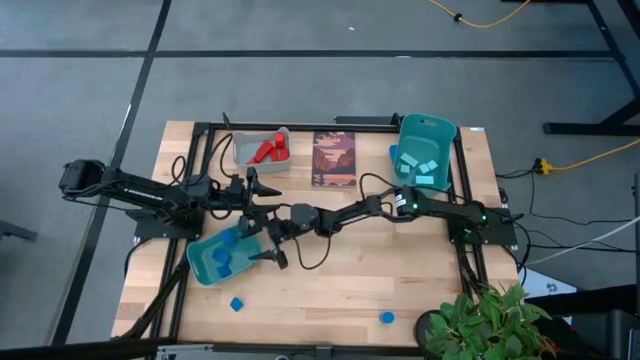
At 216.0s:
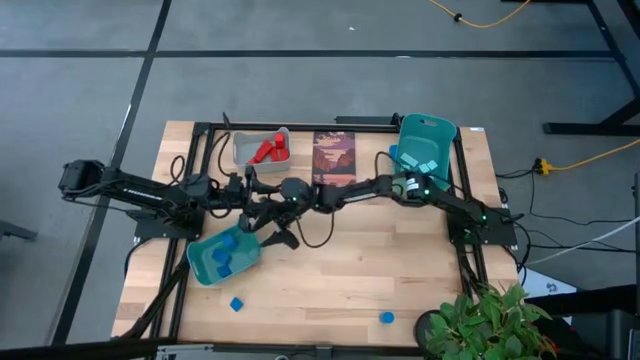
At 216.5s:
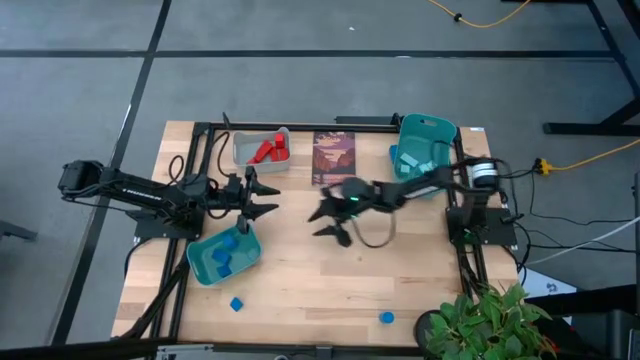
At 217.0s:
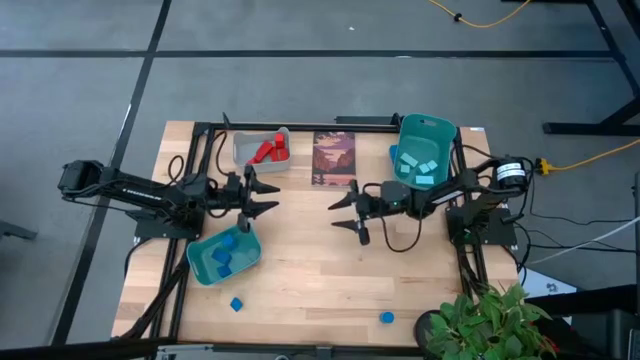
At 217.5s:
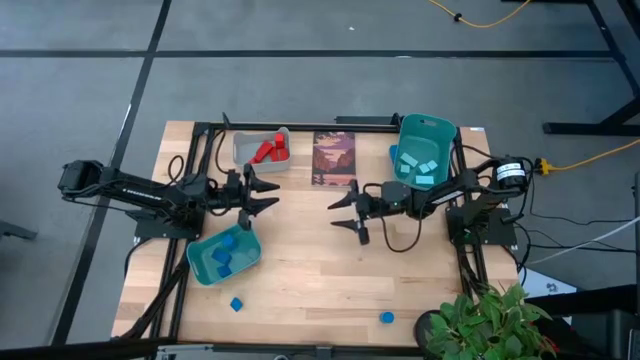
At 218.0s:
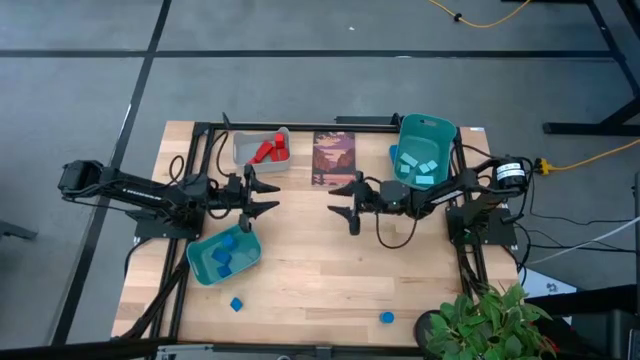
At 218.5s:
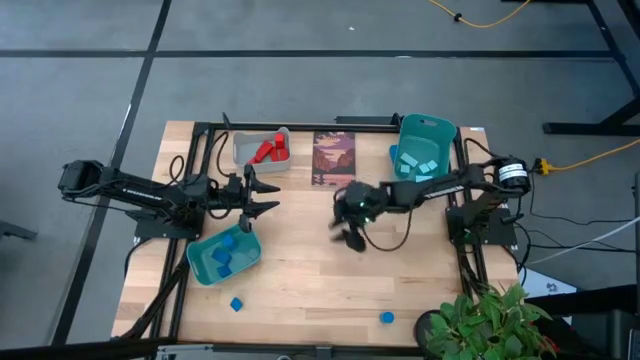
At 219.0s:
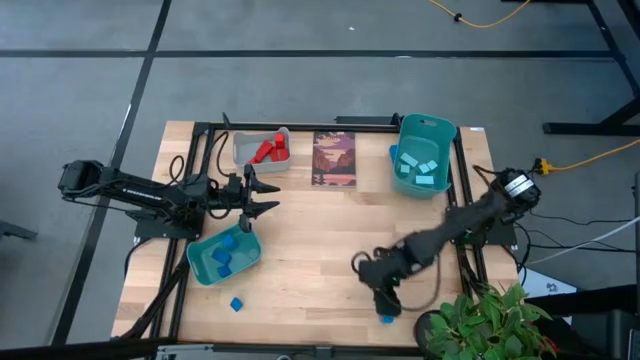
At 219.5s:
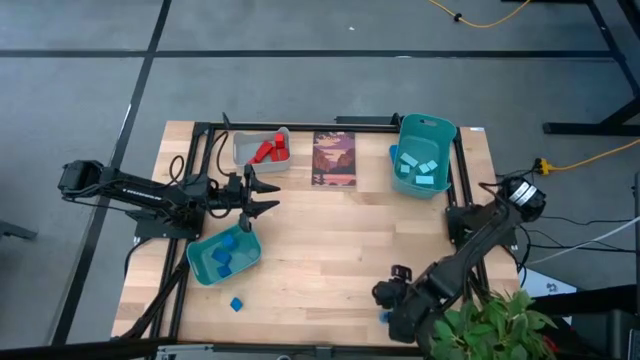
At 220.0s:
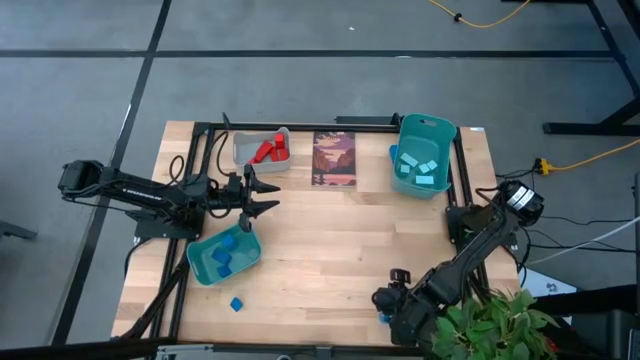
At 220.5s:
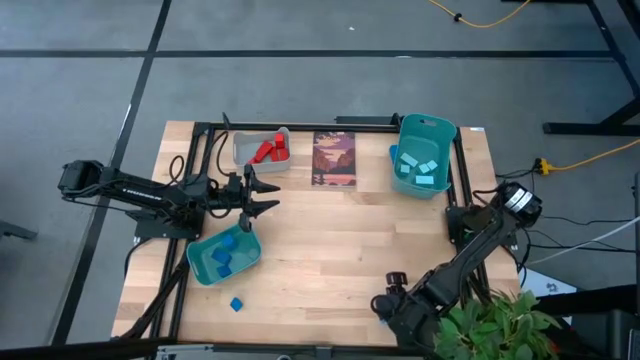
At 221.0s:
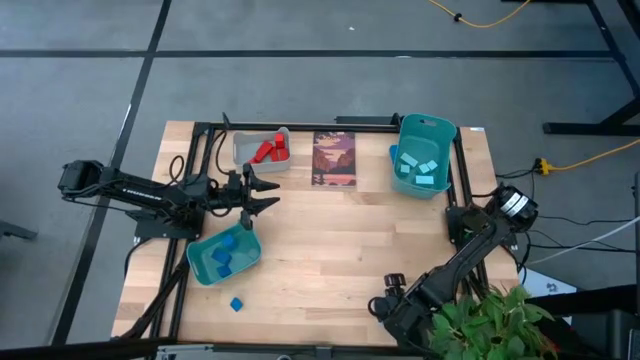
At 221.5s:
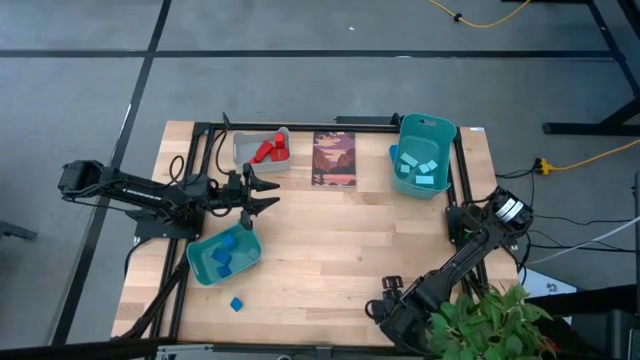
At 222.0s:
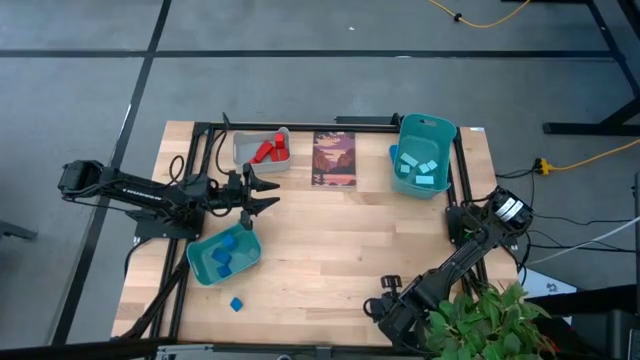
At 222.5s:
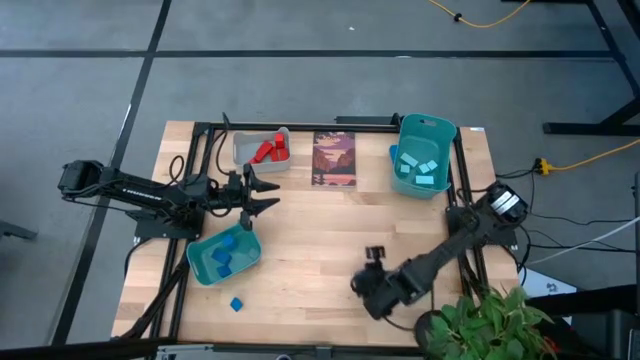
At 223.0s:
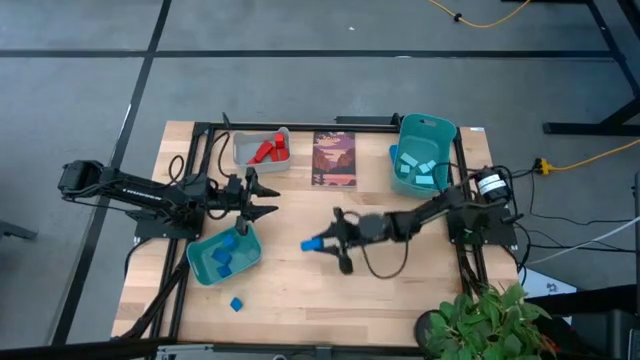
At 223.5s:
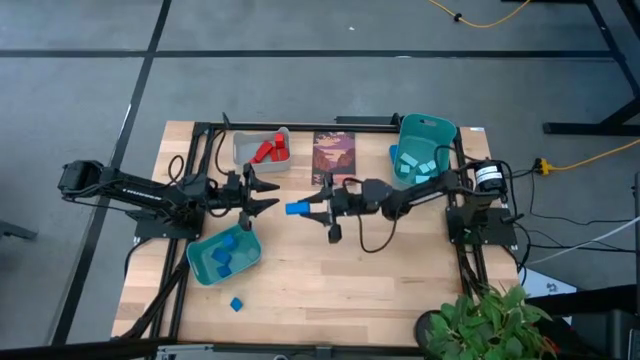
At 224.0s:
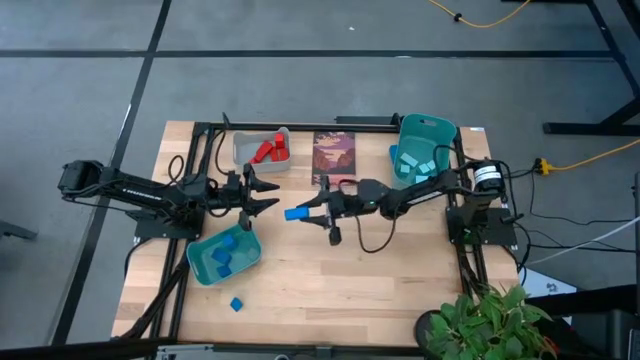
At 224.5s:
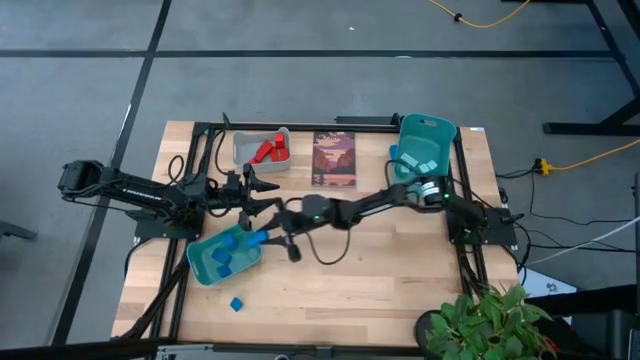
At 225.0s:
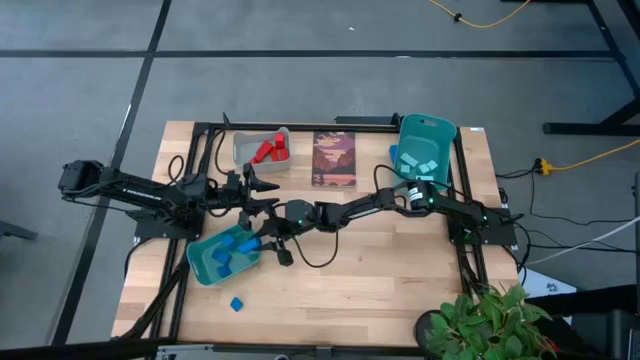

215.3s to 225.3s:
Task: Sort & place blocks by color
Put the blue block into the left green bin

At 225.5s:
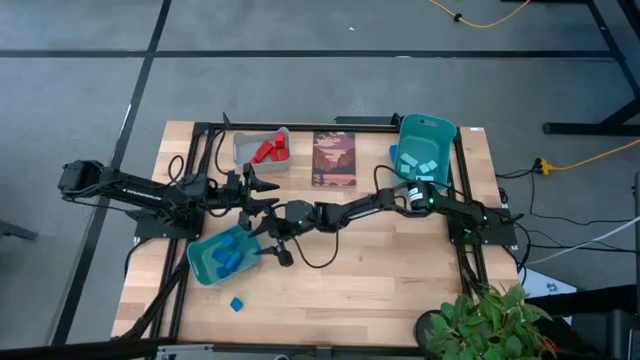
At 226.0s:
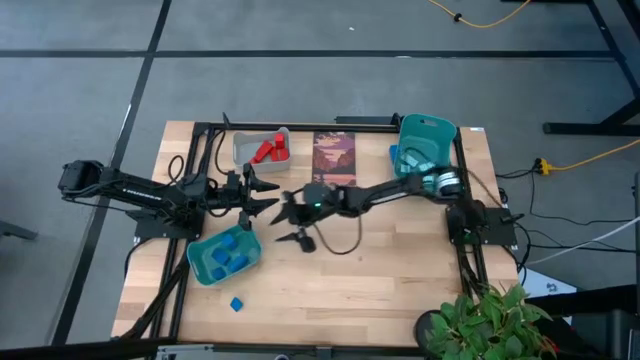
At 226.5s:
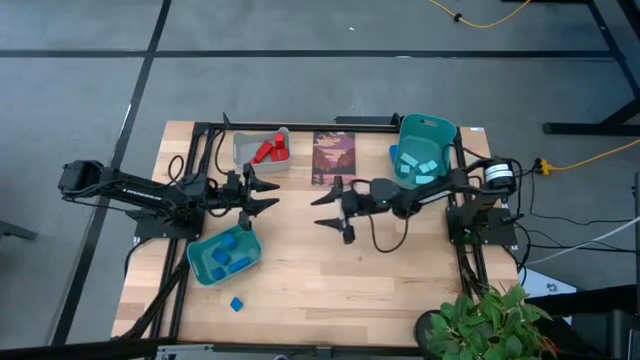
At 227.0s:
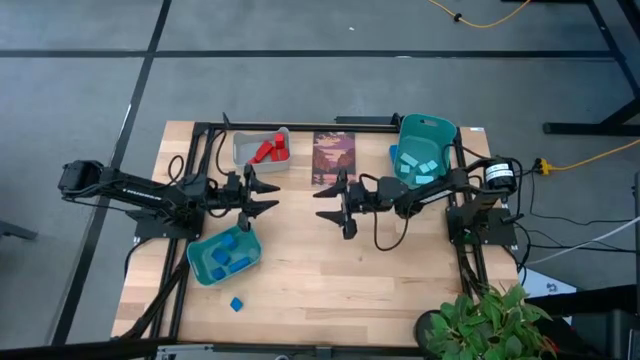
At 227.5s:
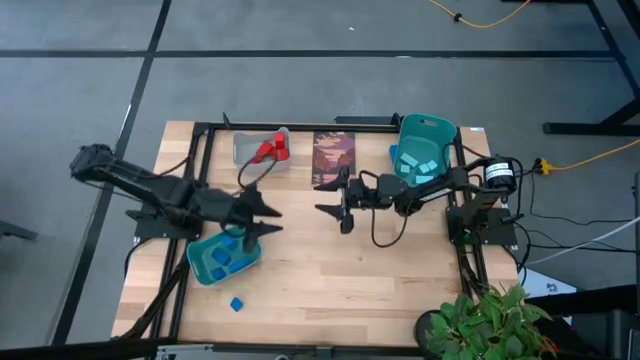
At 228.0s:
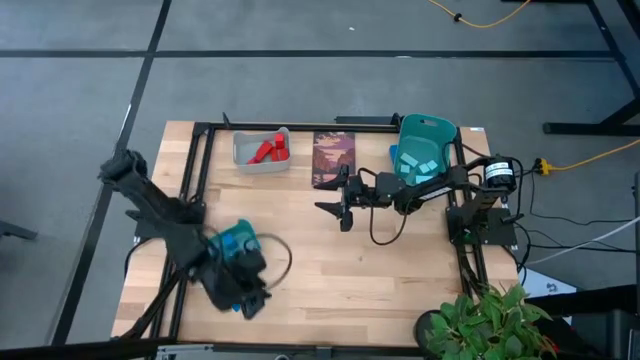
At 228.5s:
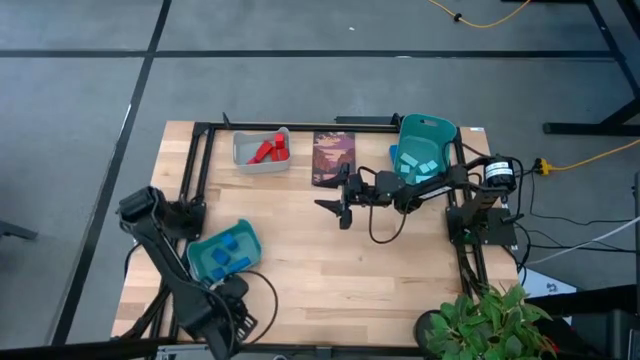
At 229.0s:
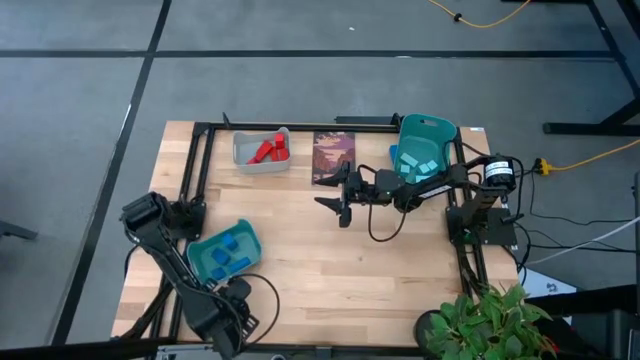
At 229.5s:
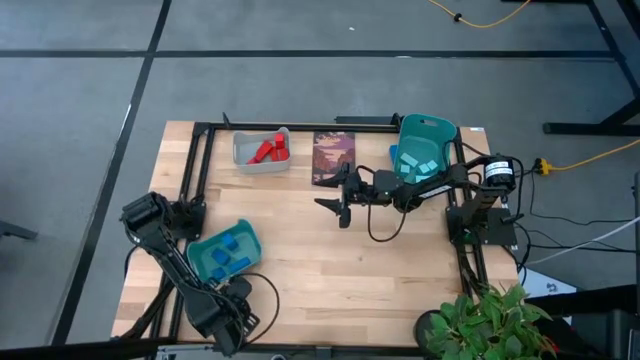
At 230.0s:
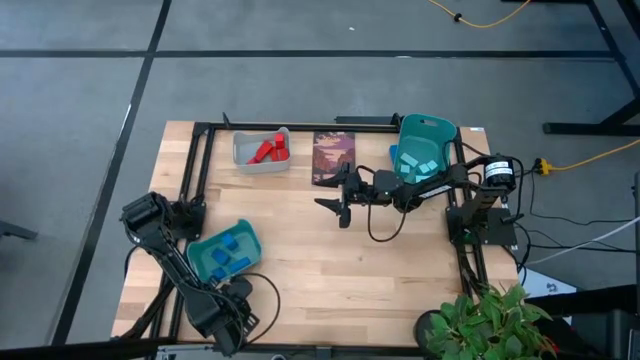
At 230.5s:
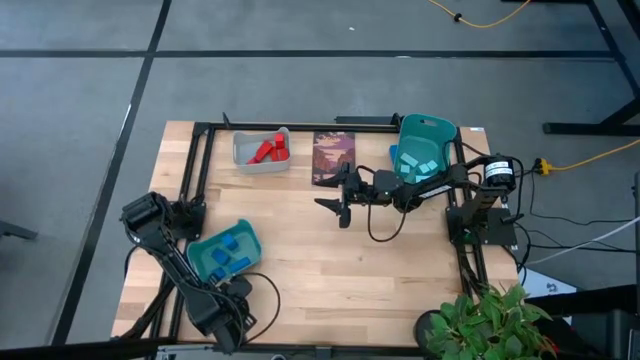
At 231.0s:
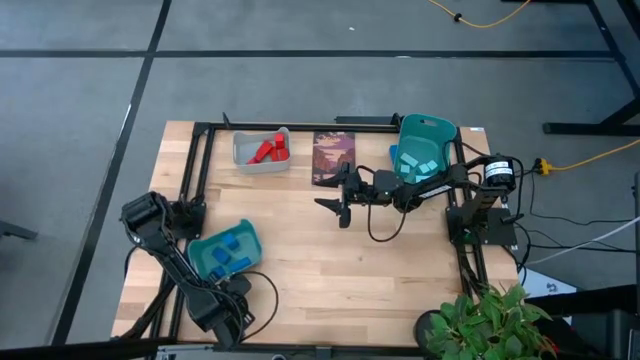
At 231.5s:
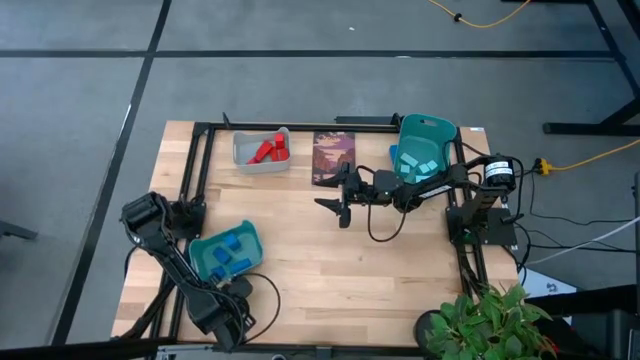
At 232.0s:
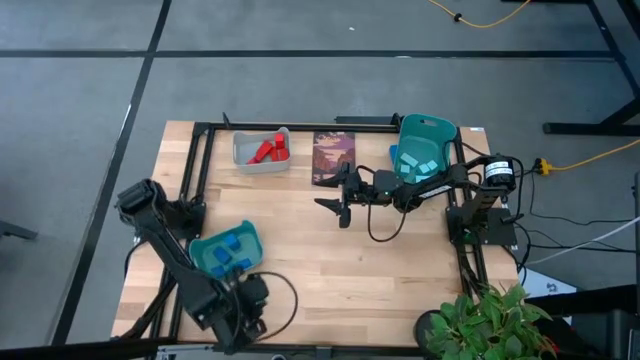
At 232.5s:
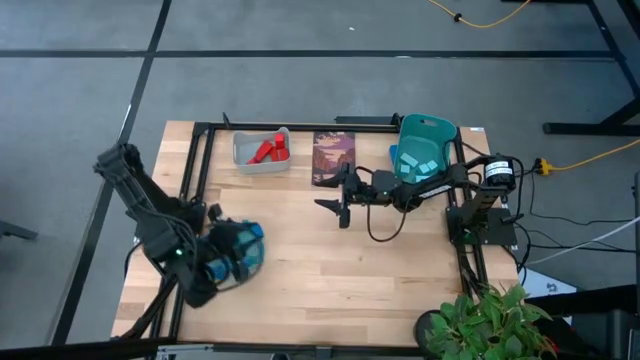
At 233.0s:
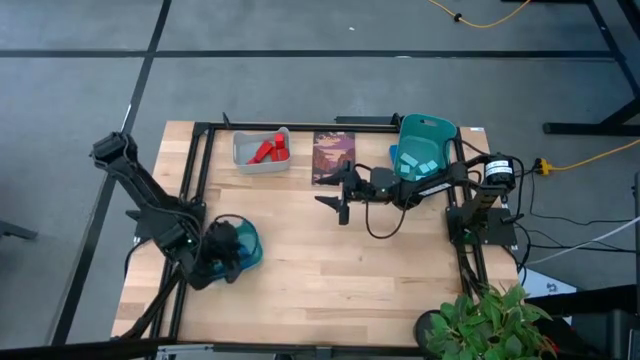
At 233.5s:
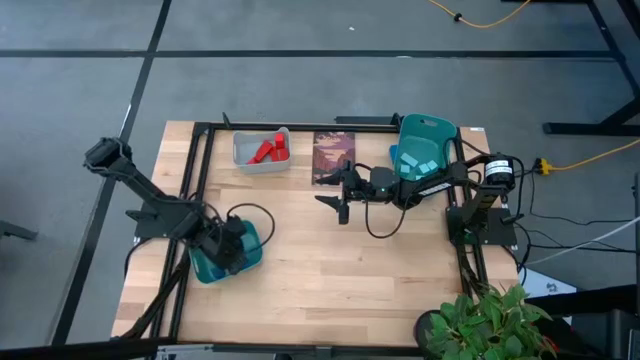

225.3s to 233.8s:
Put the blue block into the left green bin

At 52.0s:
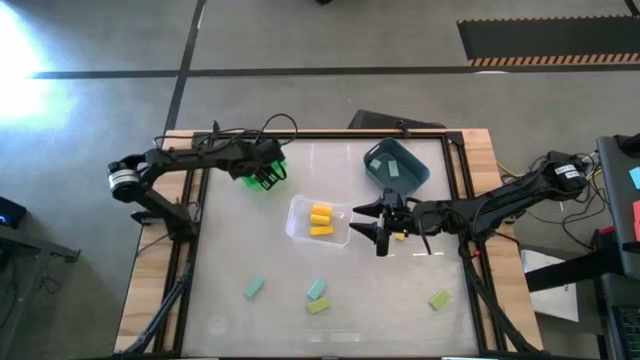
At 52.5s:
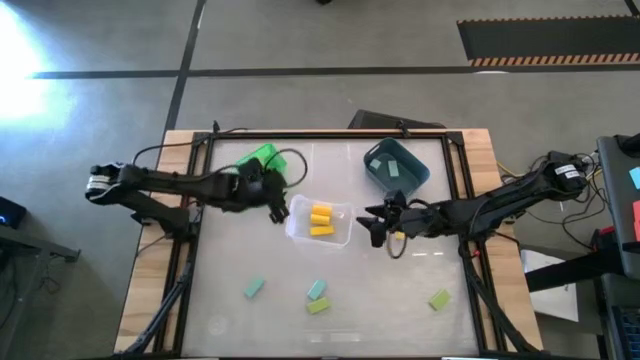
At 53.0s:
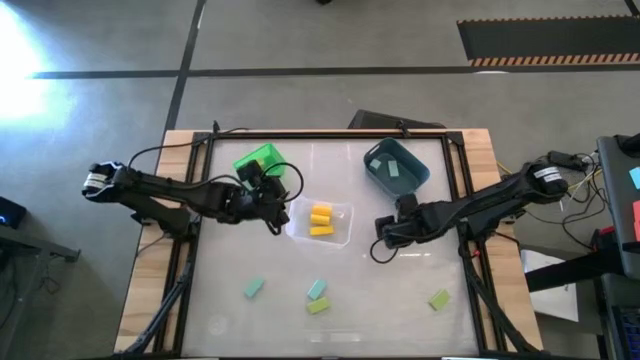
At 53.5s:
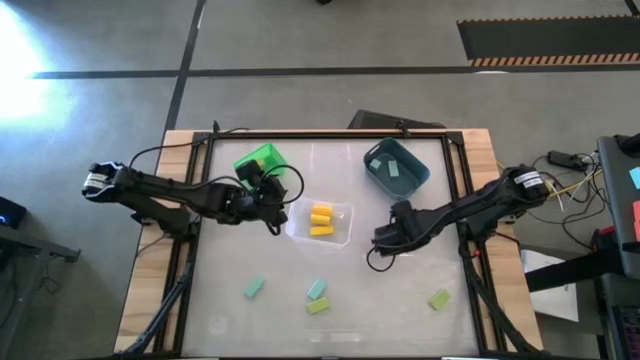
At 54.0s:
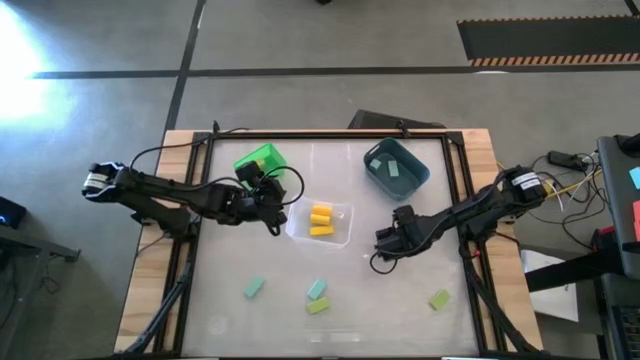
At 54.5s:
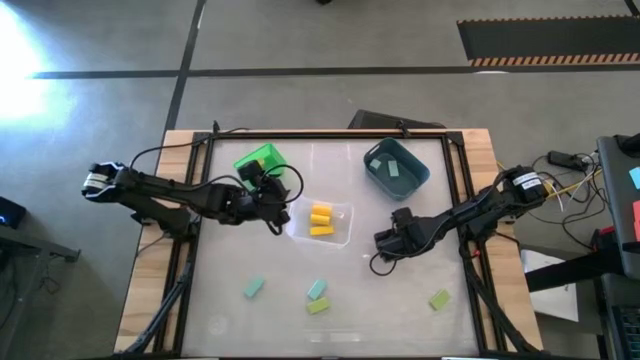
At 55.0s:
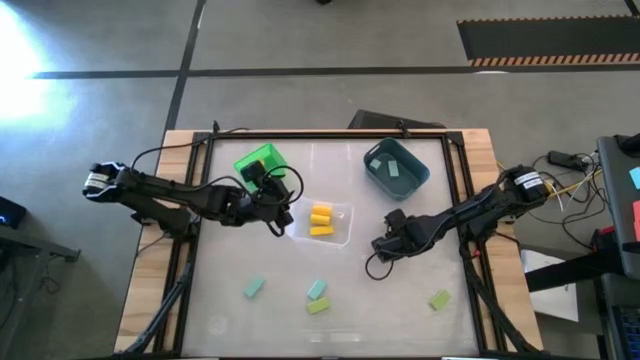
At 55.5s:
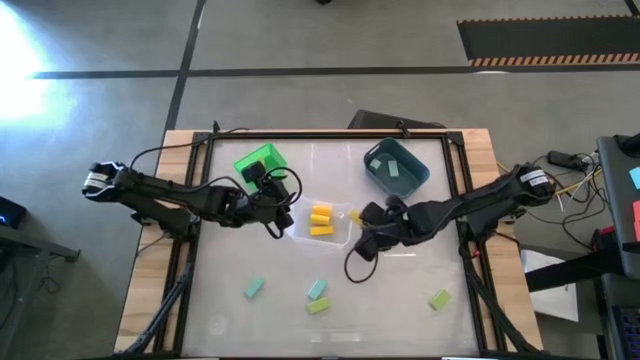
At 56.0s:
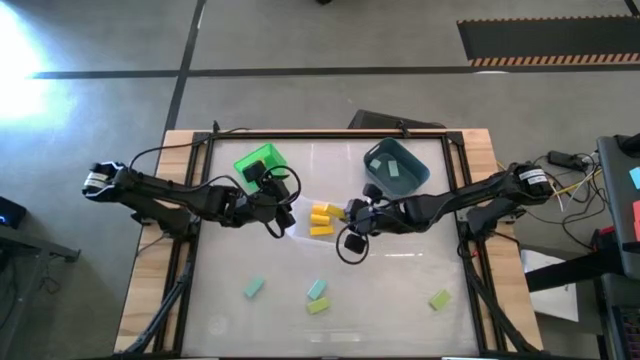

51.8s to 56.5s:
Task: Sort & place blocks by color
Put the yellow block into the transparent bin
